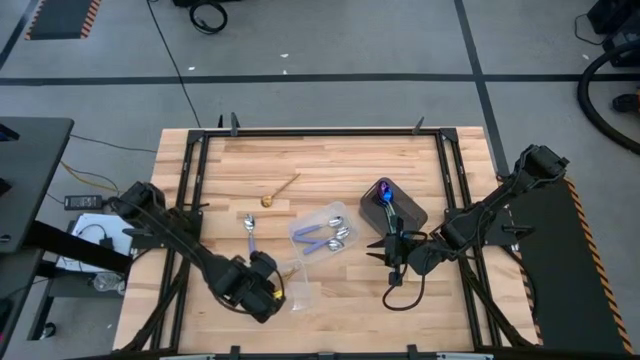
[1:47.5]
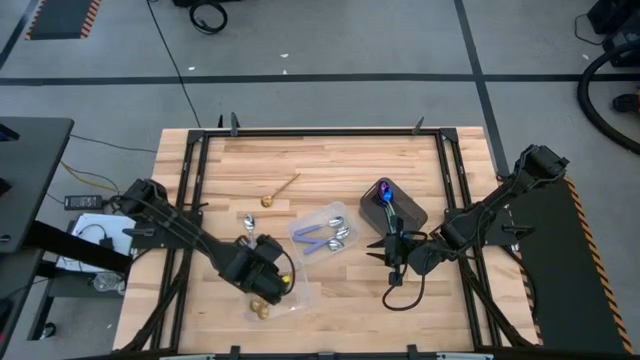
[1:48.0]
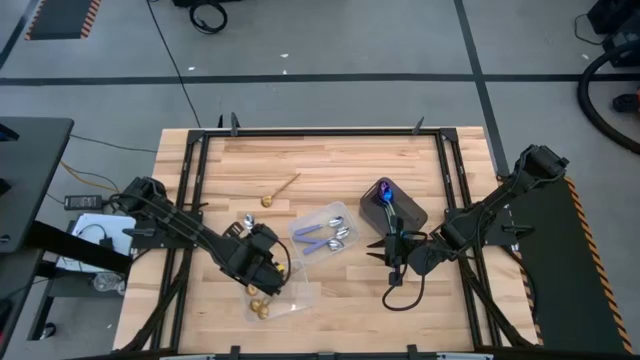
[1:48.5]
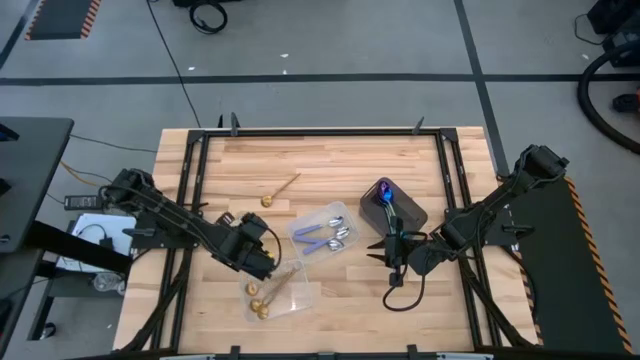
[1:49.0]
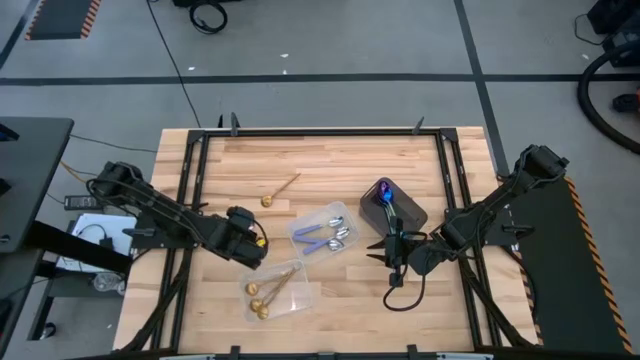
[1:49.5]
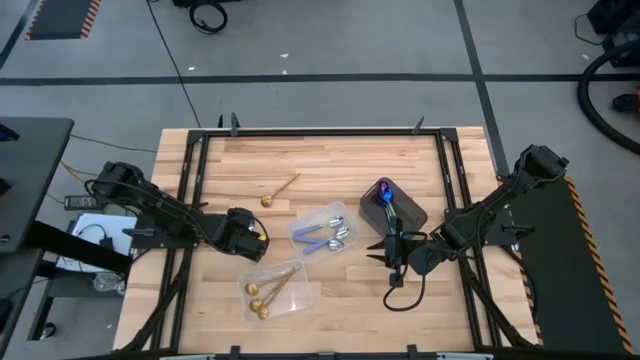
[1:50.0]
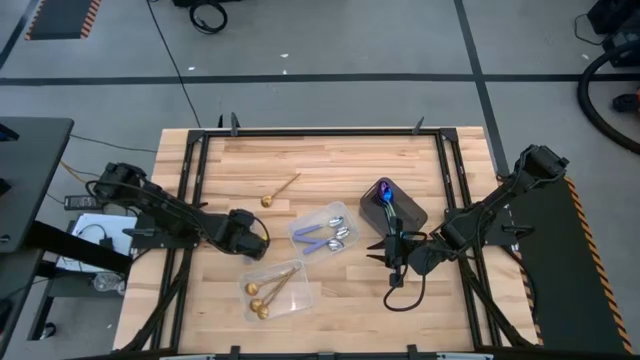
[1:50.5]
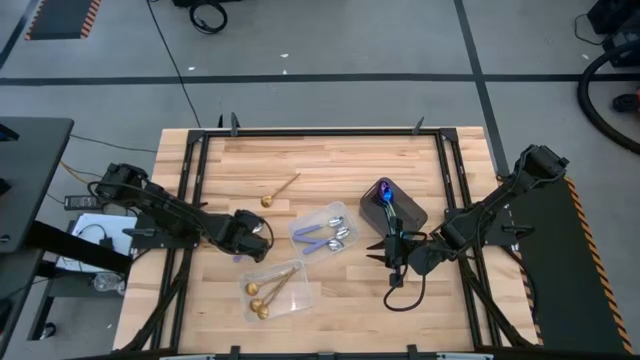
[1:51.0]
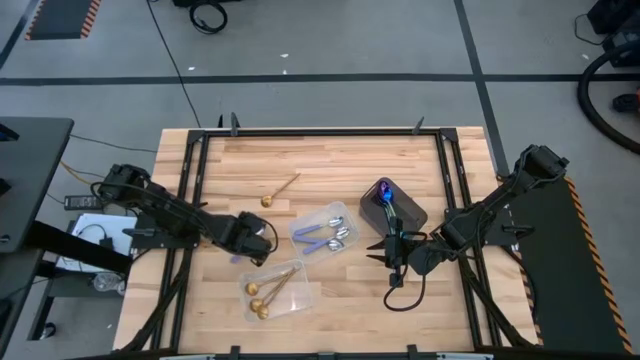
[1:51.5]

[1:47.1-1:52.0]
Task: Sort silverware by color (type)
Put the violet spoon into the top transparent bin

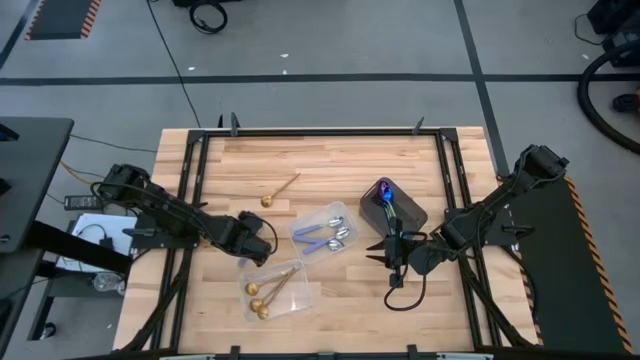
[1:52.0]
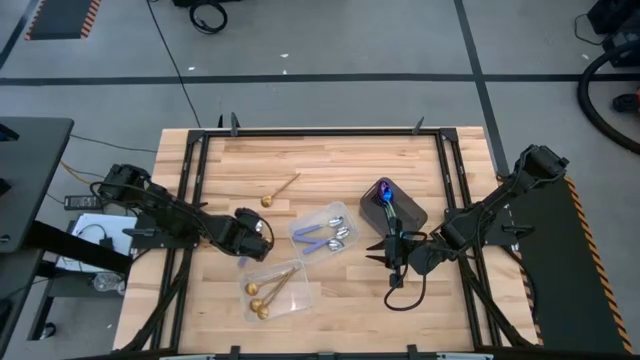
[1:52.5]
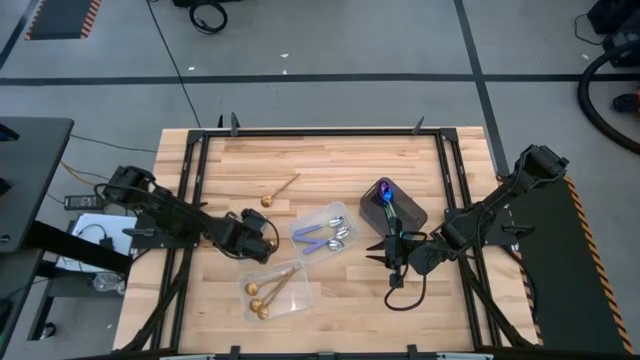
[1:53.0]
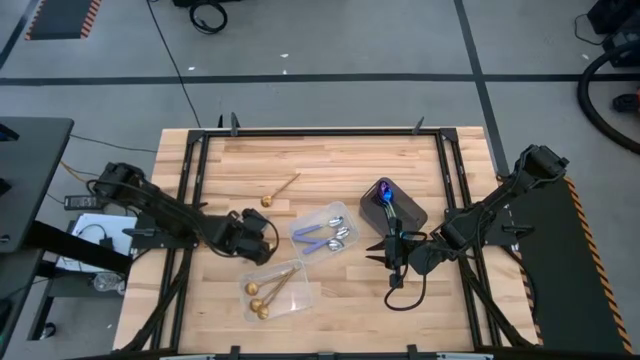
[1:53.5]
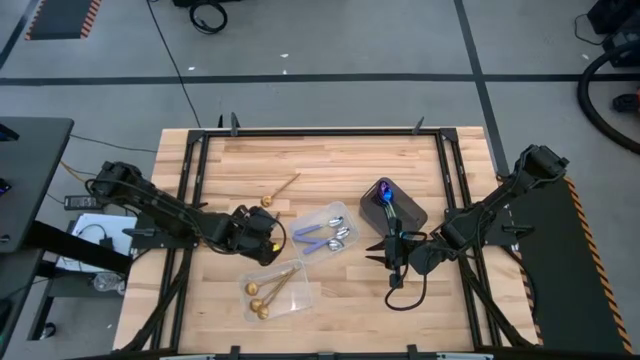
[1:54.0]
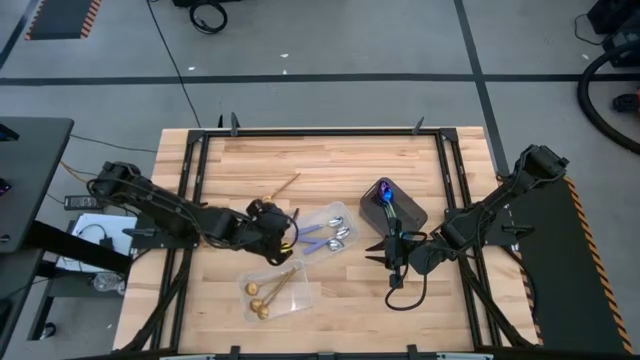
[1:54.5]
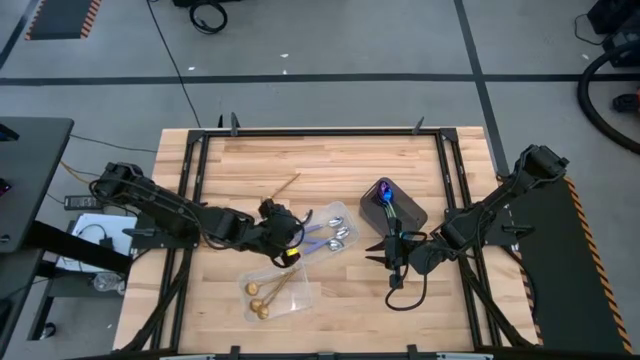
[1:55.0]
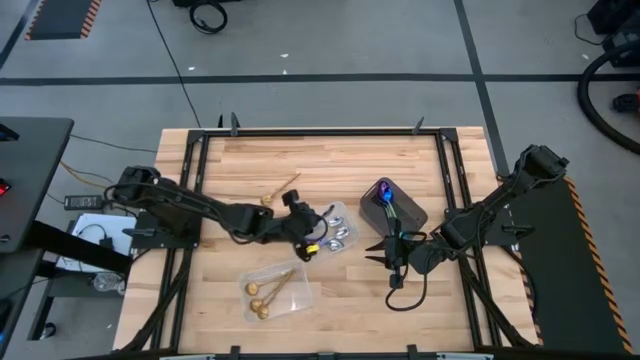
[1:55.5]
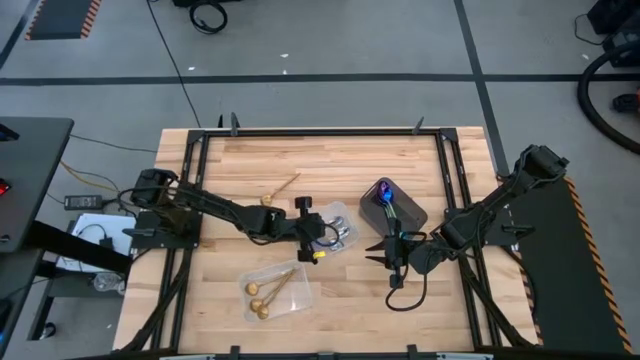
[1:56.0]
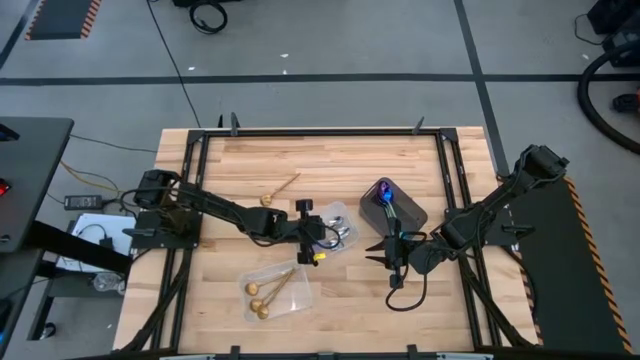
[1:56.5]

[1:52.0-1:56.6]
Put the violet spoon into the top transparent bin

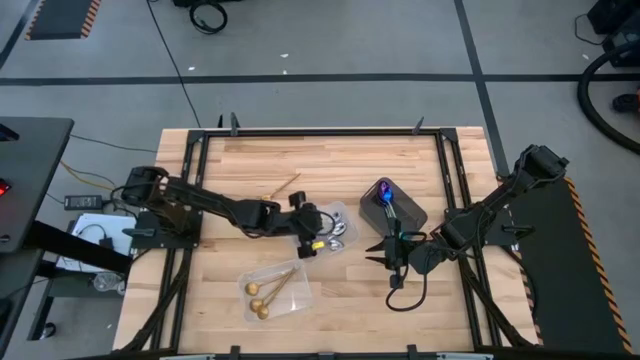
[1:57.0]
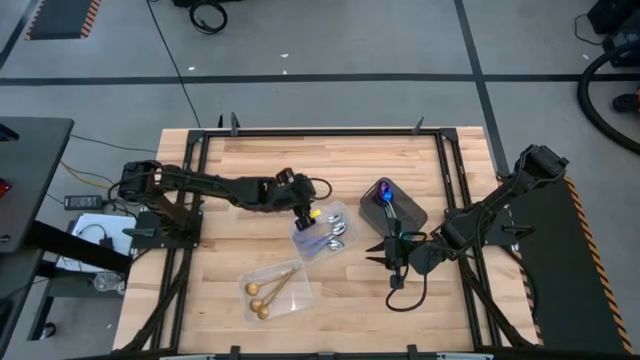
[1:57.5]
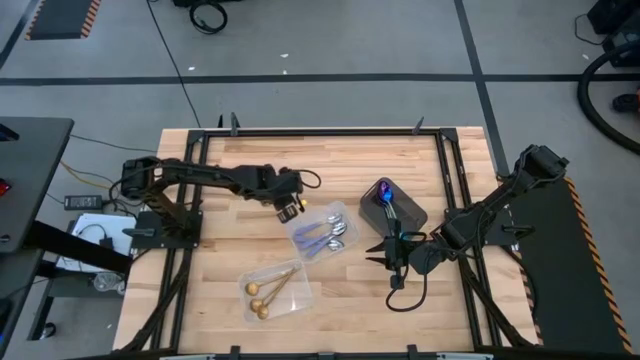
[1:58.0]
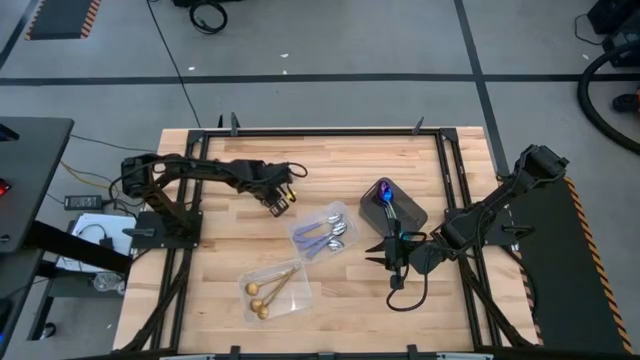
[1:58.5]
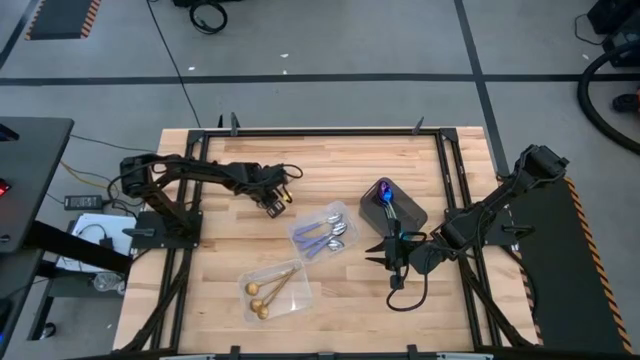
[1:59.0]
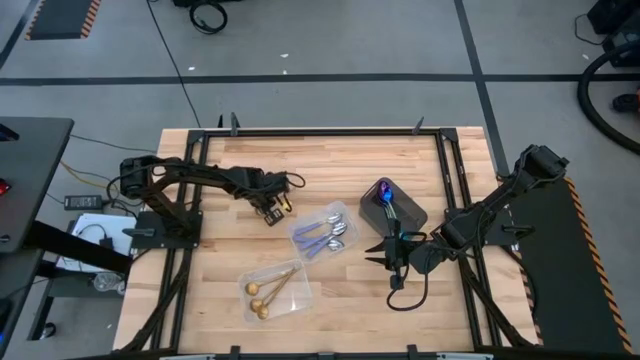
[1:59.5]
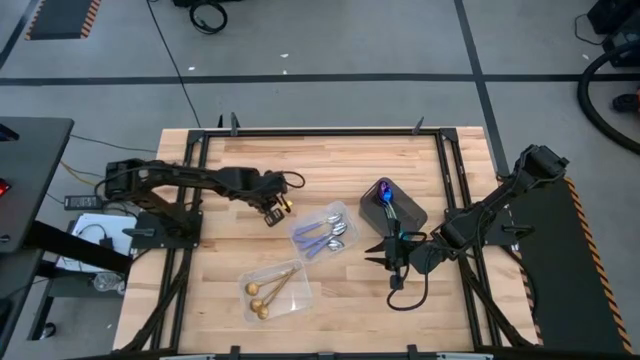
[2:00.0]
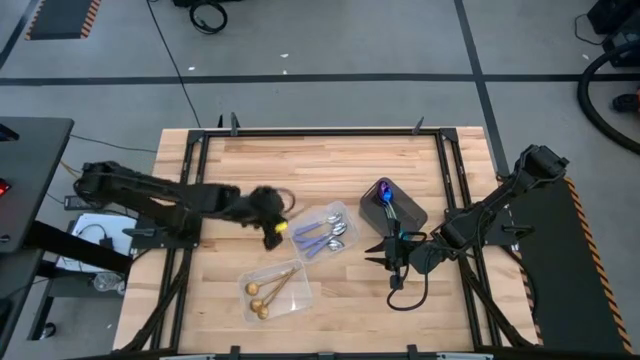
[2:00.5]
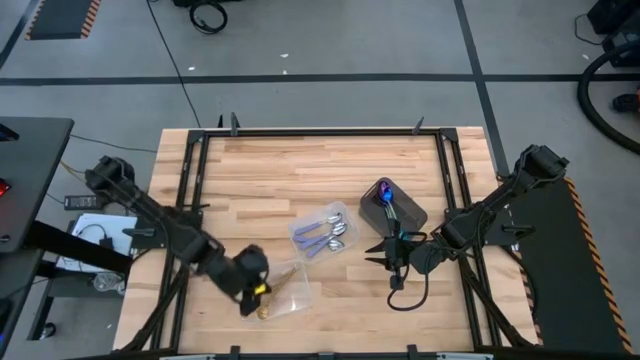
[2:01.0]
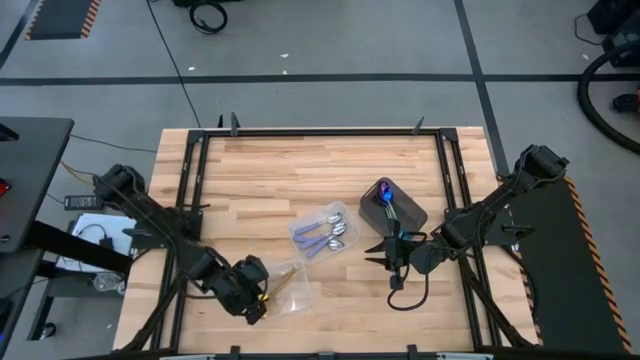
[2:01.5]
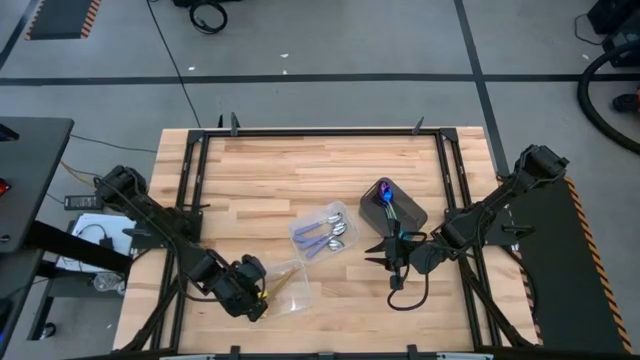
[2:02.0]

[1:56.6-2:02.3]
Put the gold spoon into the bottom transparent bin

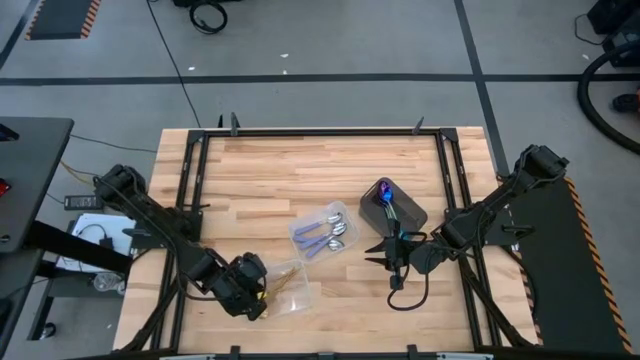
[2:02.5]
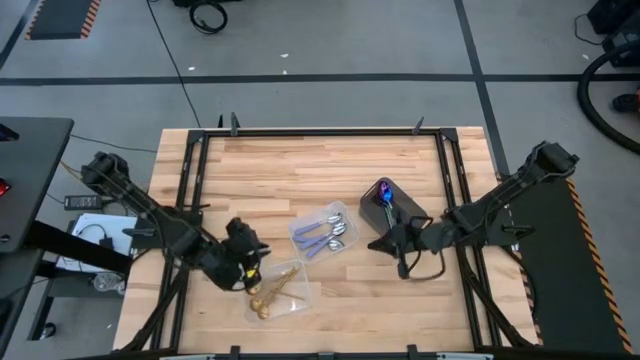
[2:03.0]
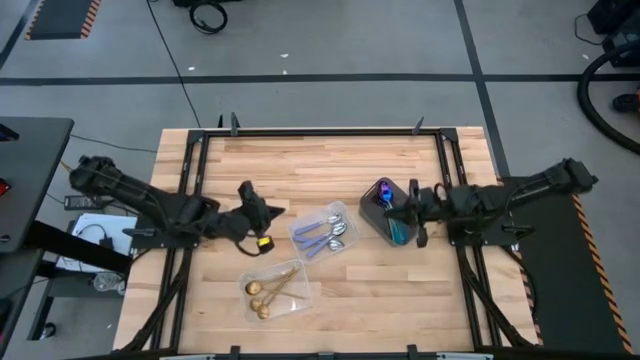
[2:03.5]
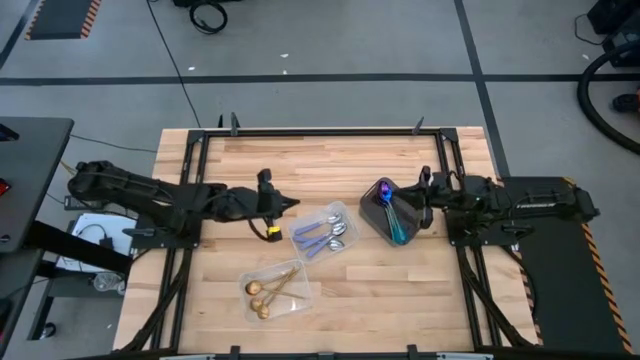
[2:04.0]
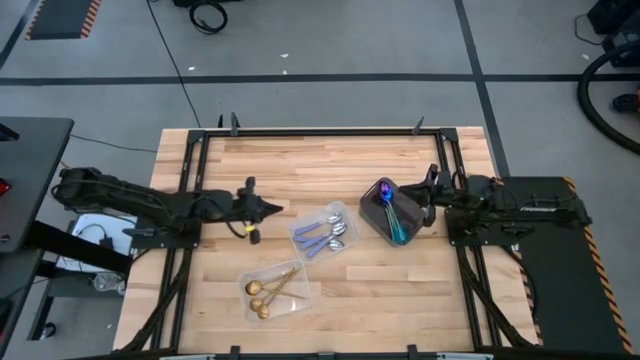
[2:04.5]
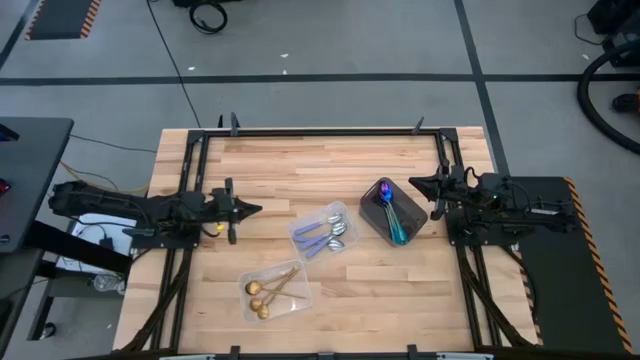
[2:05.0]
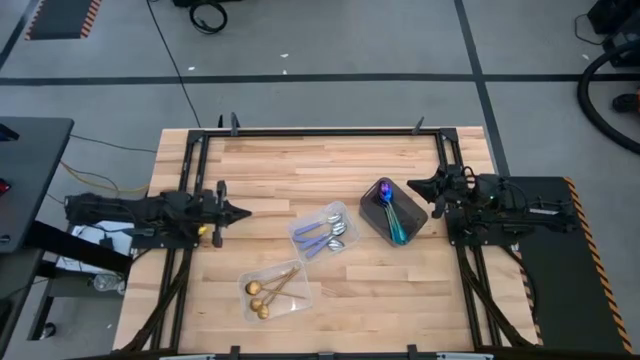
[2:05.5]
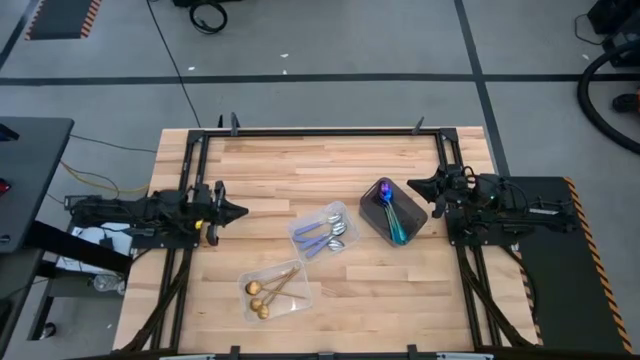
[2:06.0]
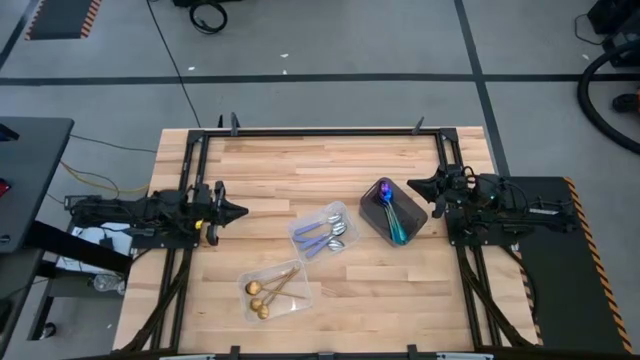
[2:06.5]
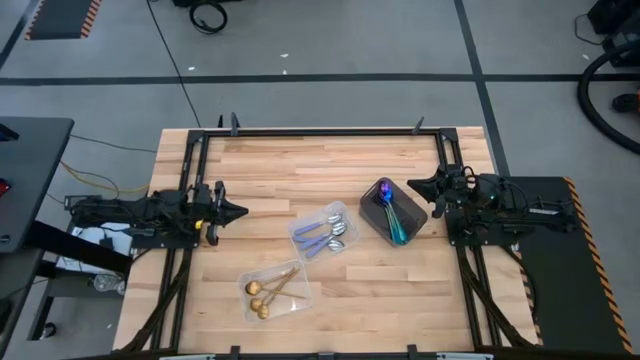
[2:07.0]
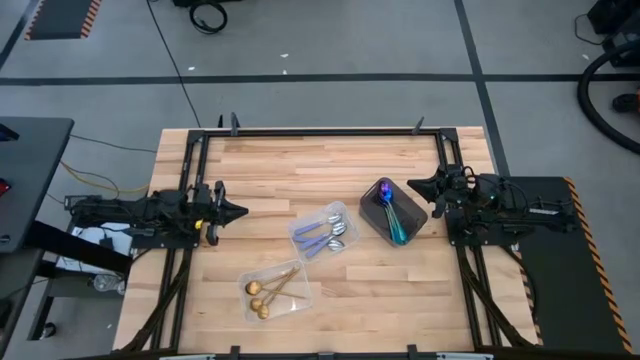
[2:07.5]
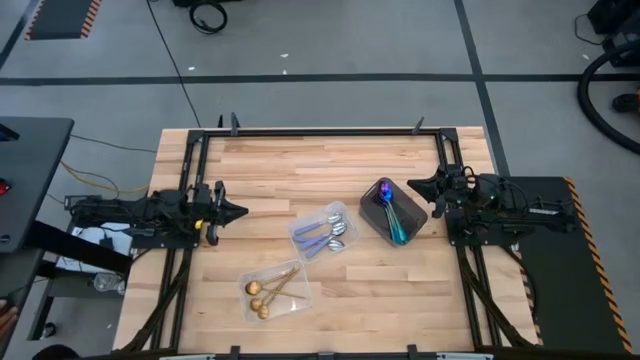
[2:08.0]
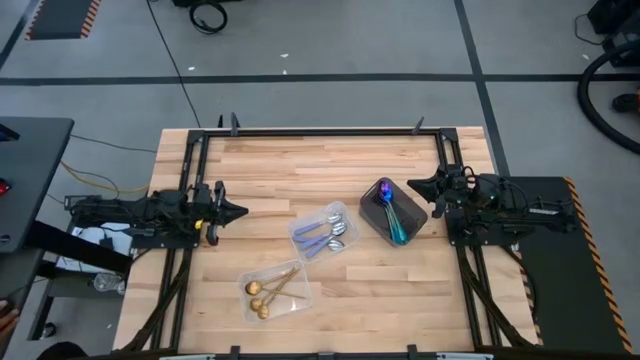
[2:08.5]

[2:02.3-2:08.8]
Return to Home Position
